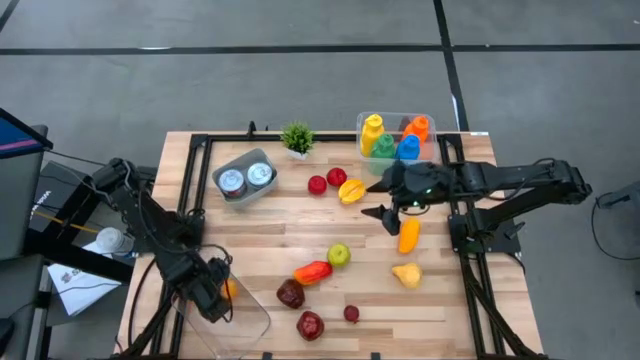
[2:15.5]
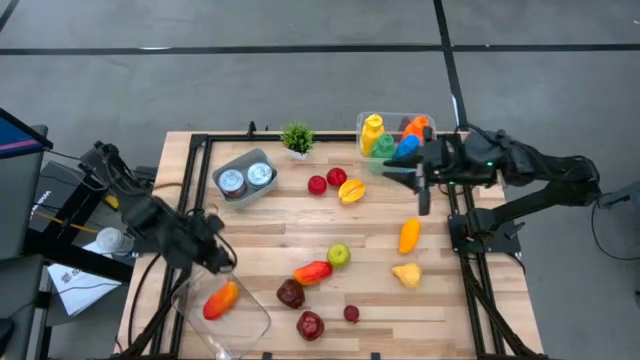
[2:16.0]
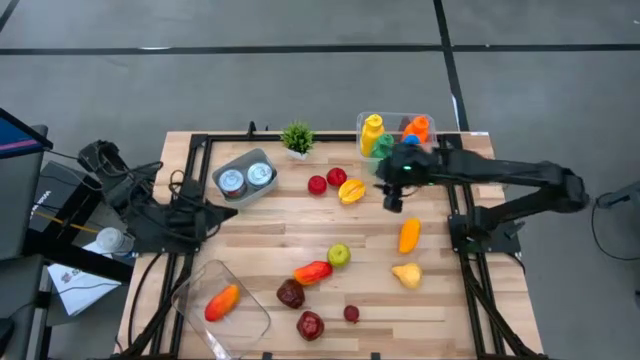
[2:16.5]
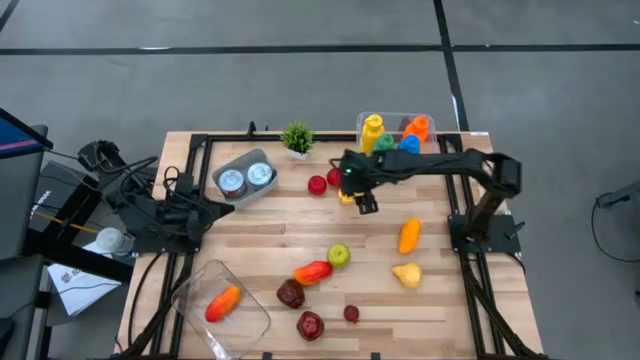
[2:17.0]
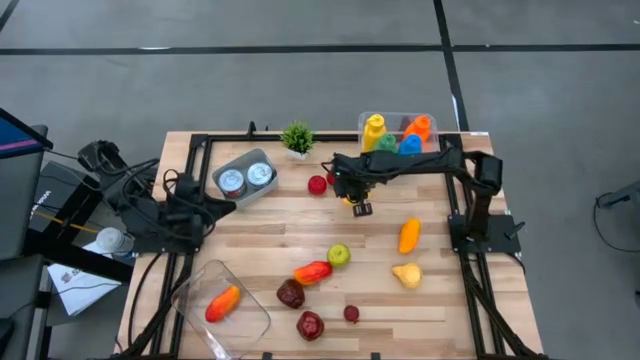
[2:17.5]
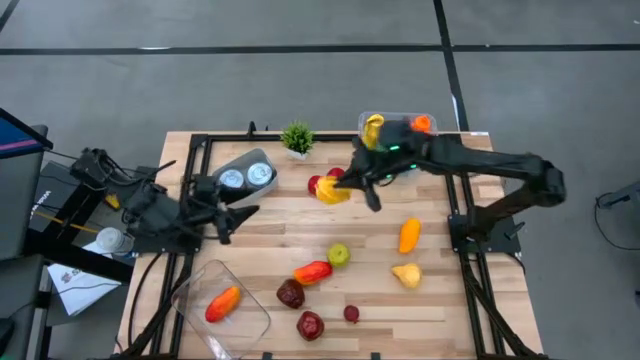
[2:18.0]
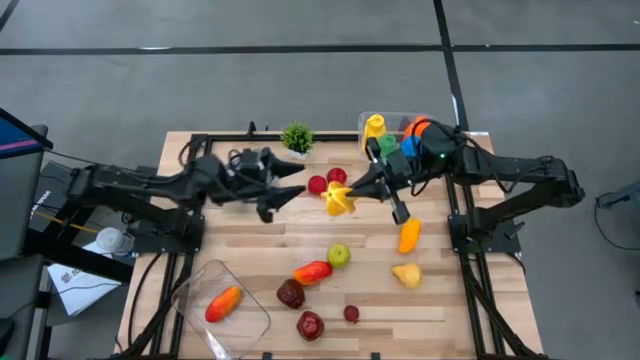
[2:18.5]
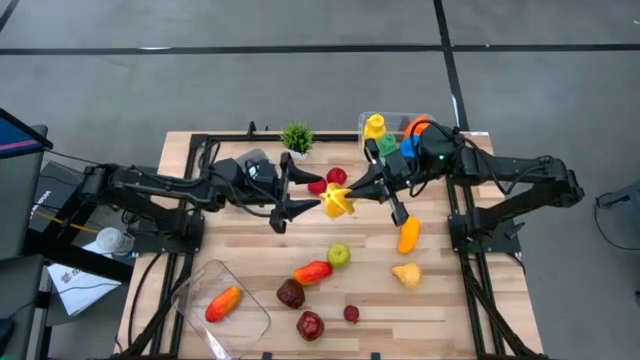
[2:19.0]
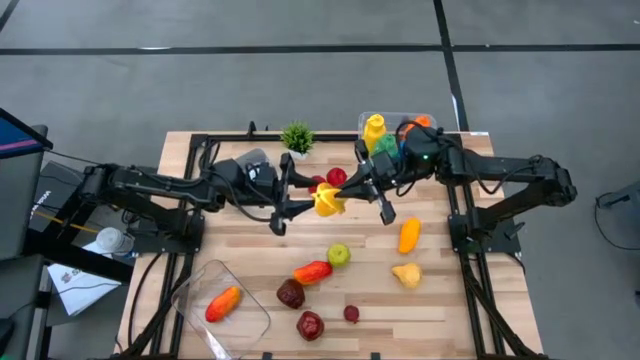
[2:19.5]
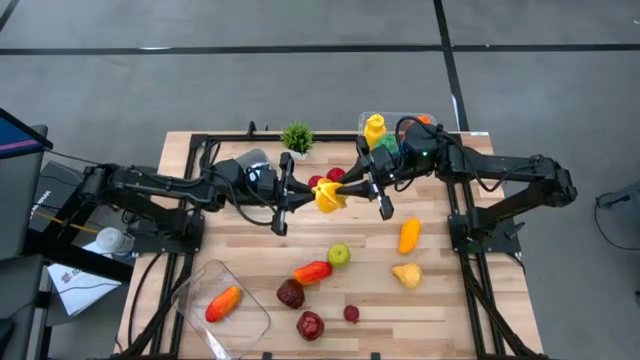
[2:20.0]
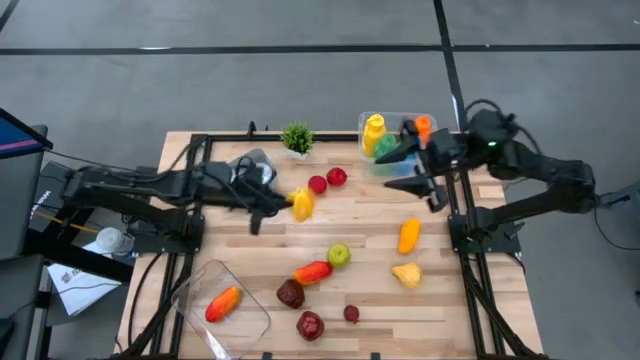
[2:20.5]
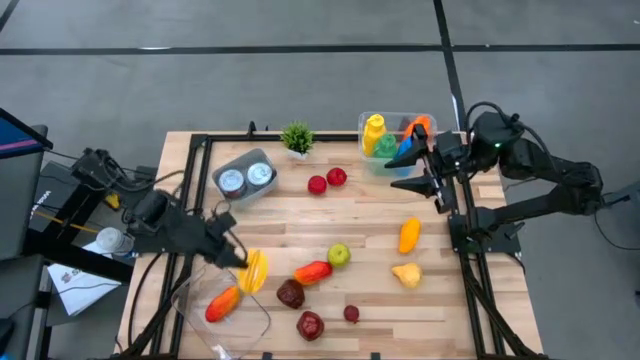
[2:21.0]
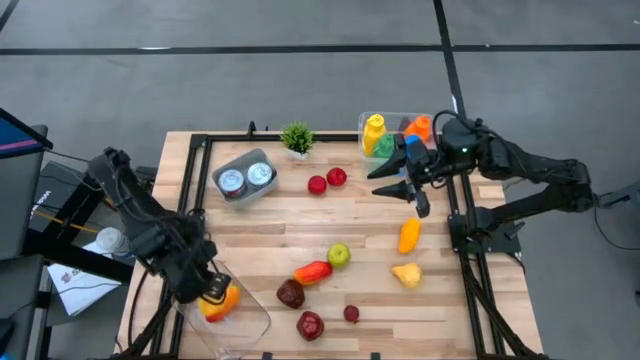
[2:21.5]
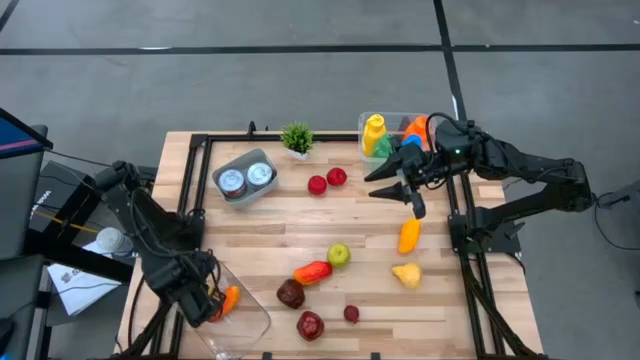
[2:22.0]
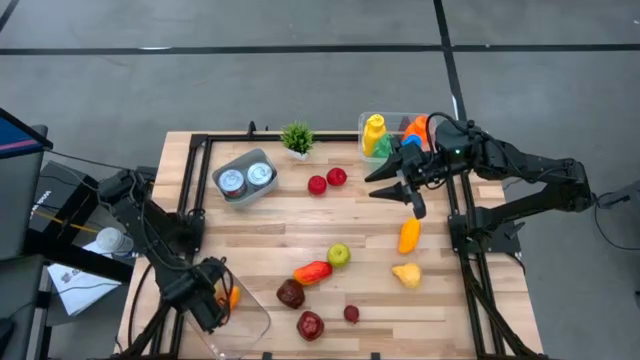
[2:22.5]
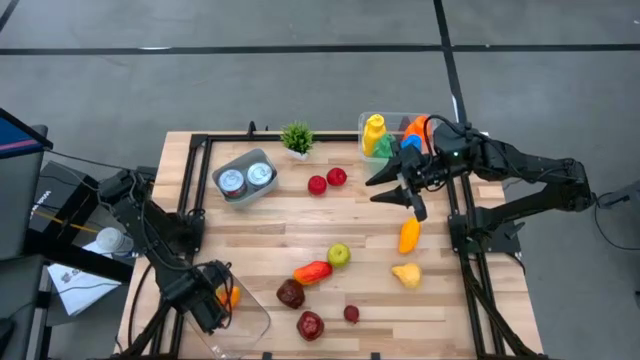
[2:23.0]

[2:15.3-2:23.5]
Task: Pick & Place Food Item
Put the yellow star fruit into the bottom transparent bin

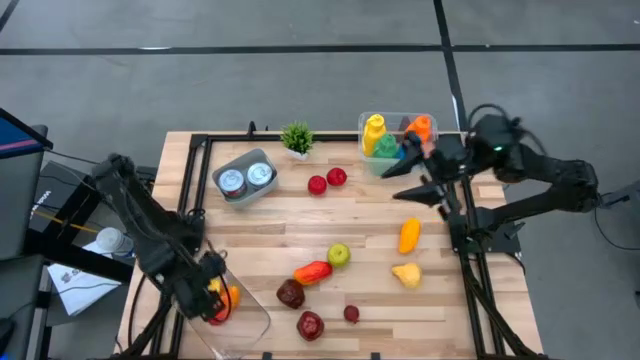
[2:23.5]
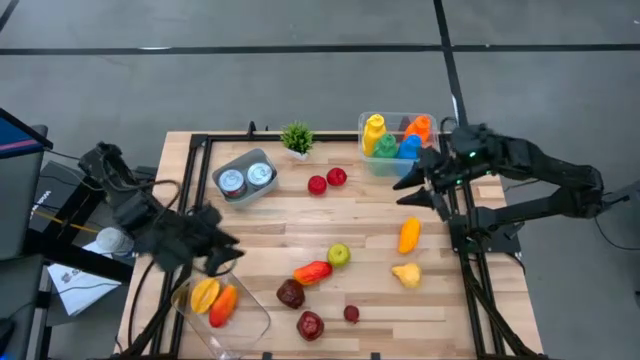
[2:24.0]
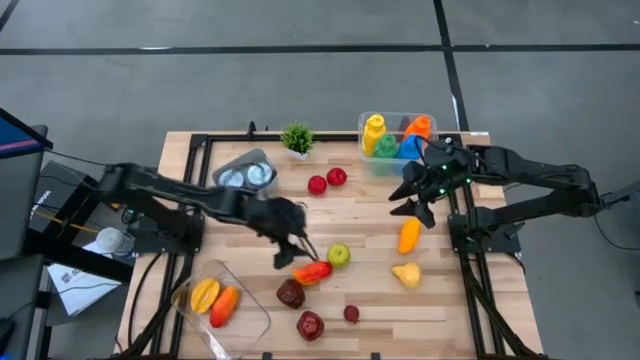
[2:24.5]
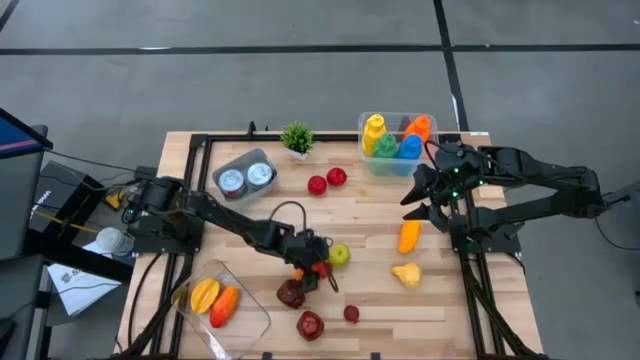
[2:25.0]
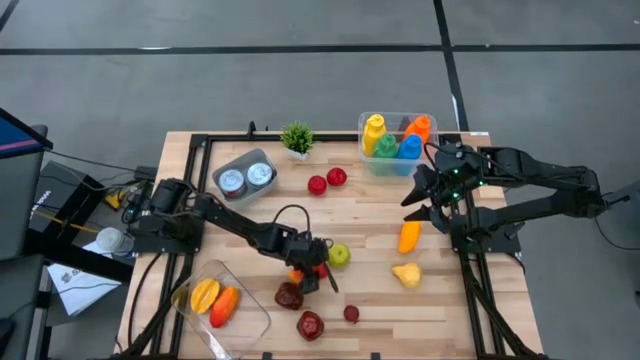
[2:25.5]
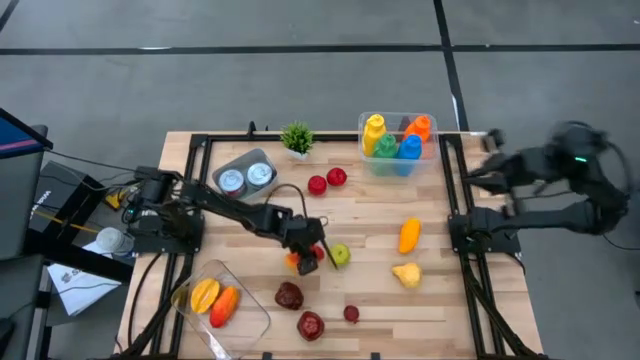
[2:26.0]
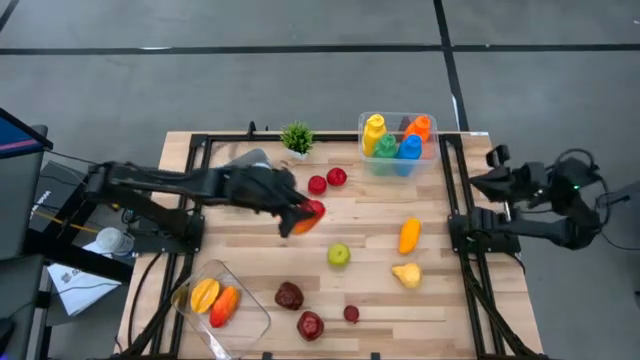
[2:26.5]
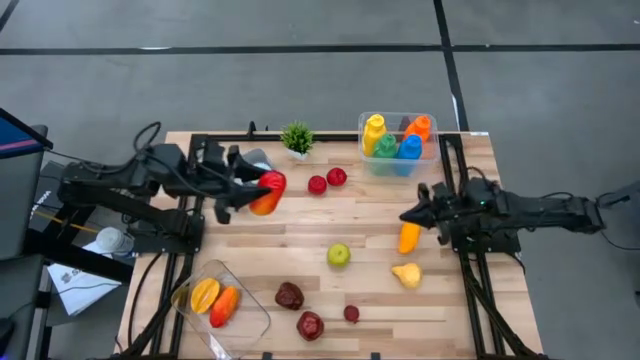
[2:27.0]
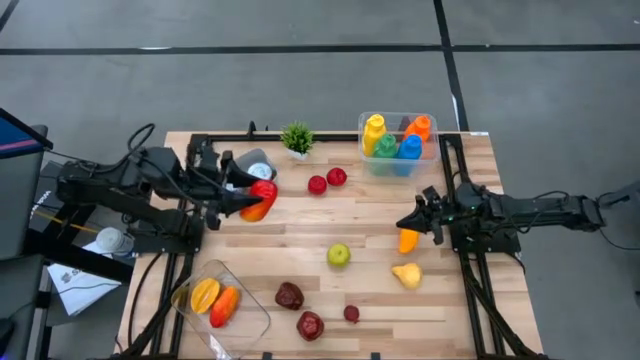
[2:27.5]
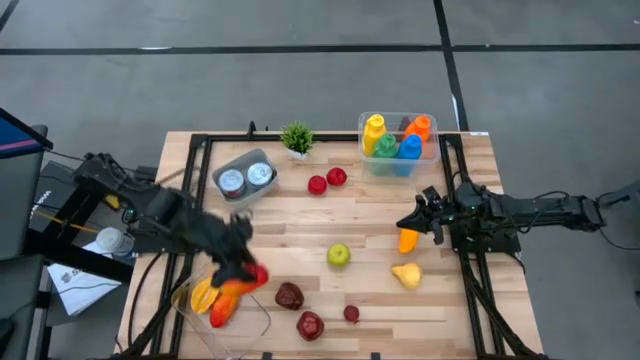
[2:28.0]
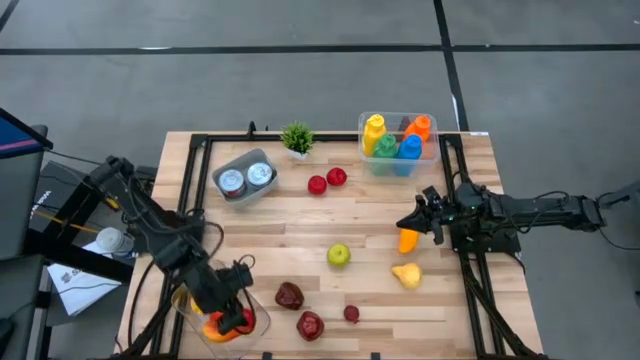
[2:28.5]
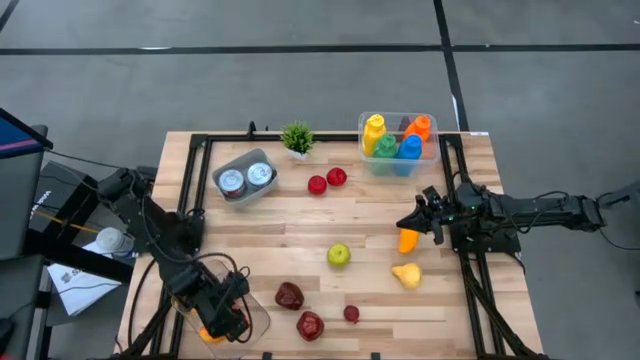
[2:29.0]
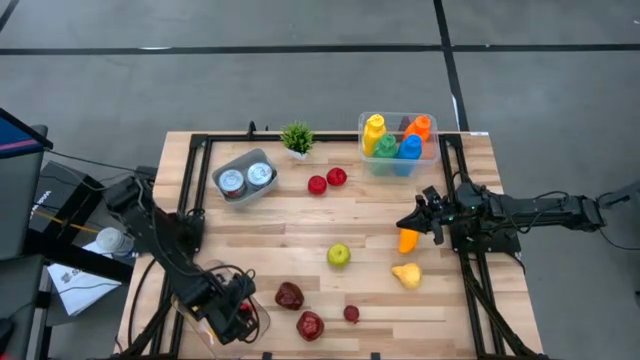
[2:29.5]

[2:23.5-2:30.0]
Put the orange mango into the bottom transparent bin

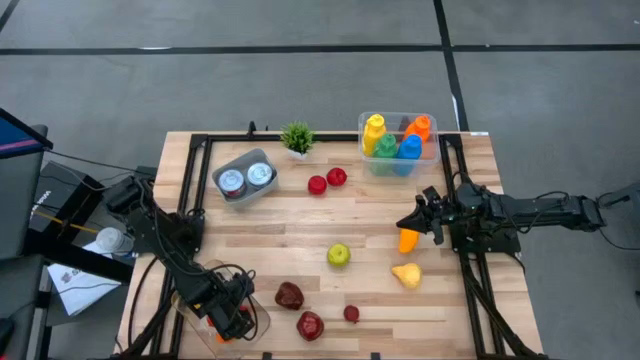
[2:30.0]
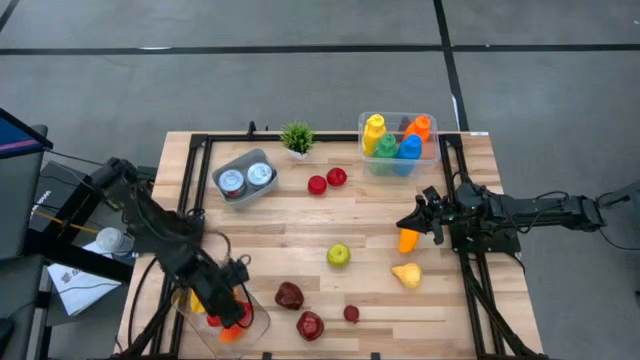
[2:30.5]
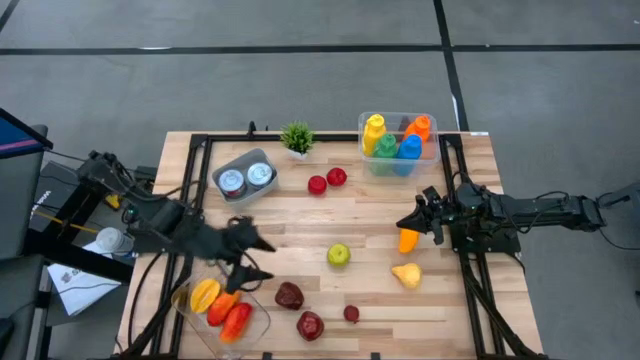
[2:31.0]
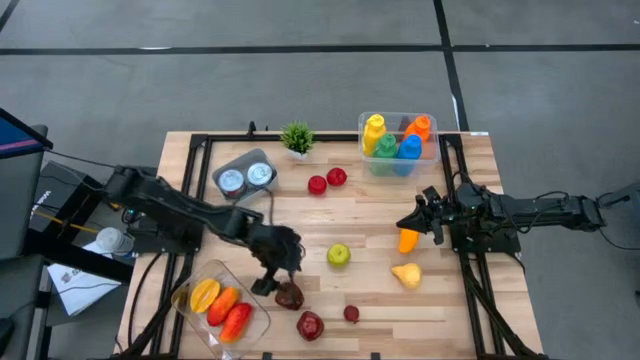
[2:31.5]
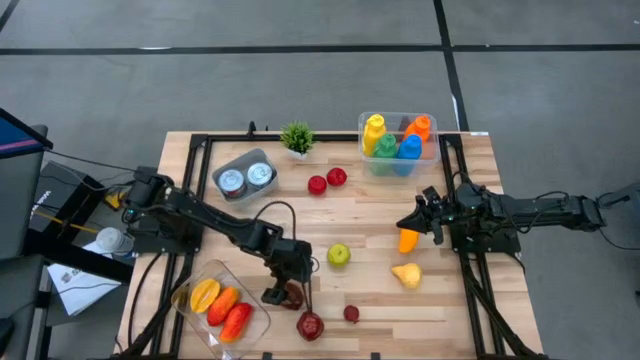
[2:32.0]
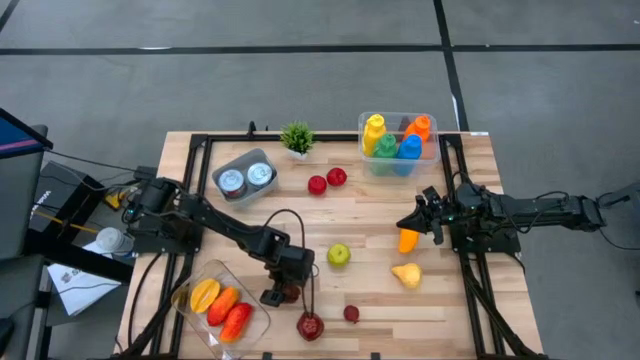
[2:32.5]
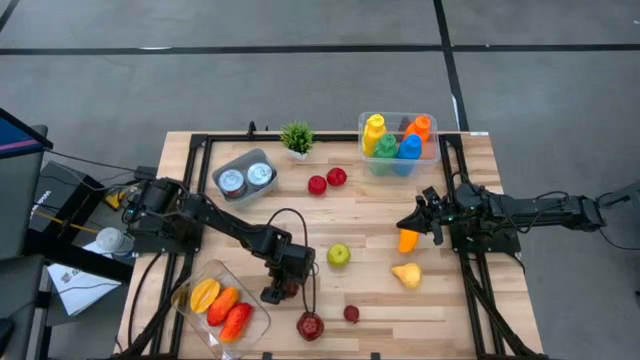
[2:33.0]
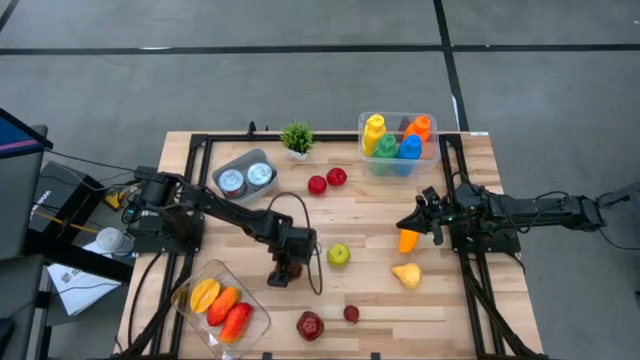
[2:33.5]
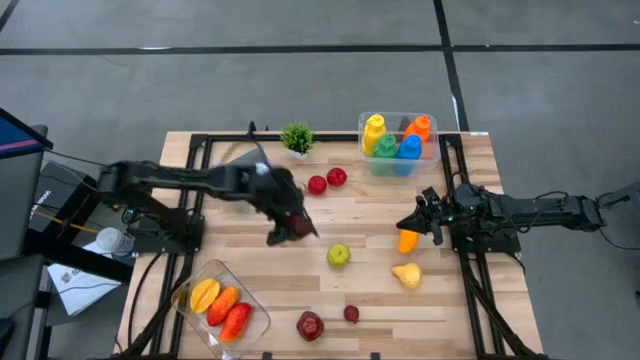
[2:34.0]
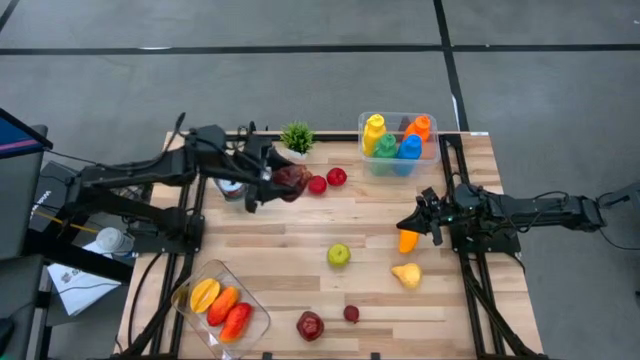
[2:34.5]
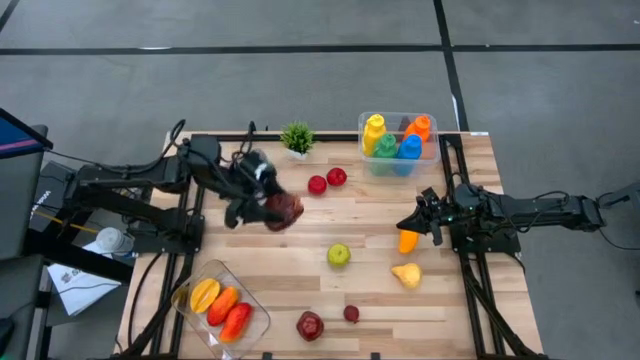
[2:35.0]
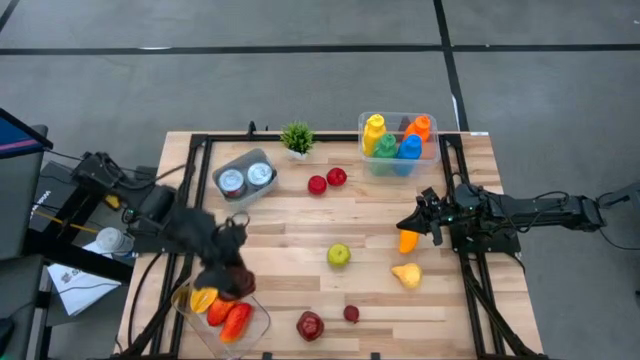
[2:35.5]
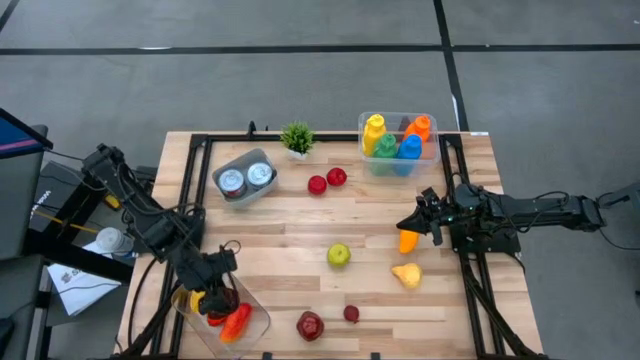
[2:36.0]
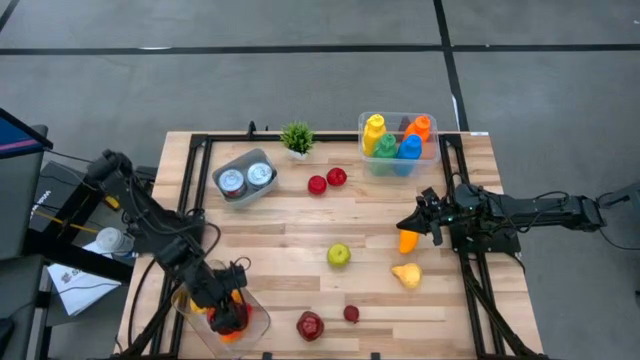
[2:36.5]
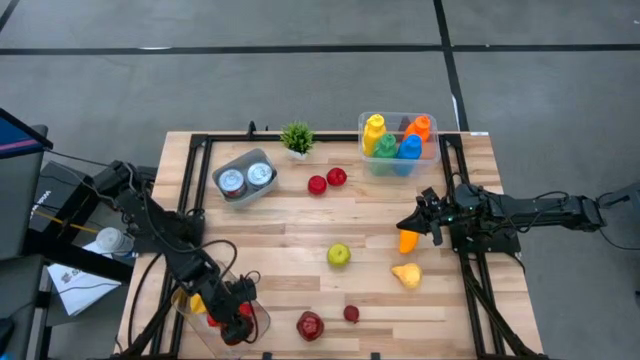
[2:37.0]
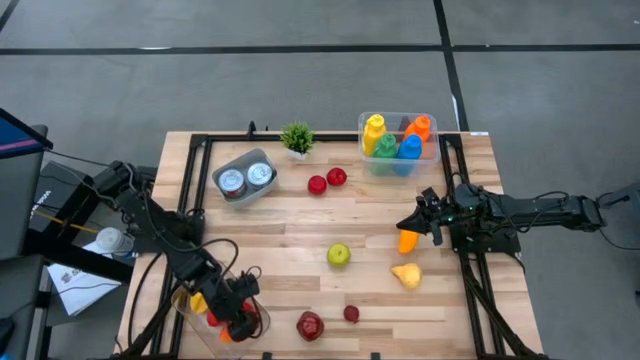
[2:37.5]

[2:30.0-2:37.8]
Put the top dark red apple into the bottom transparent bin
